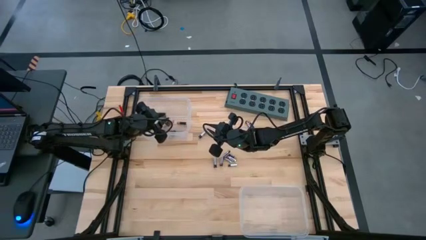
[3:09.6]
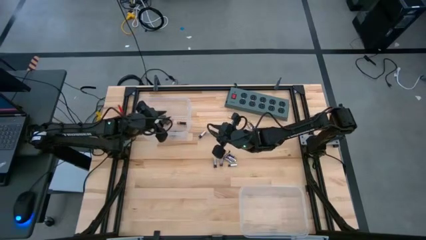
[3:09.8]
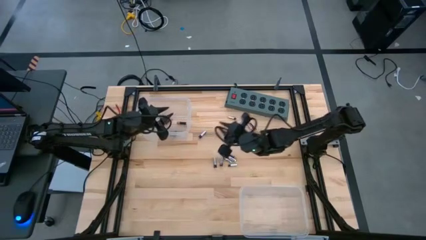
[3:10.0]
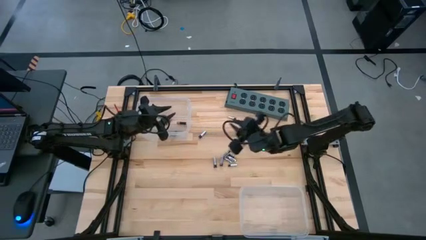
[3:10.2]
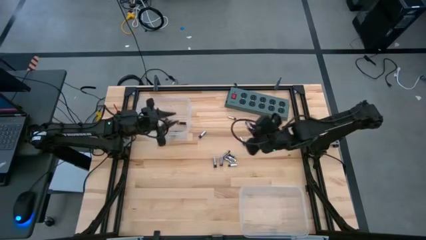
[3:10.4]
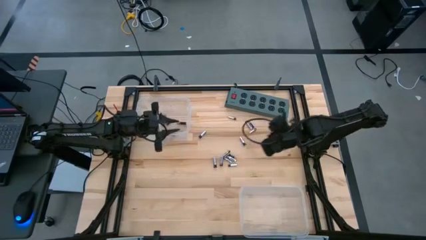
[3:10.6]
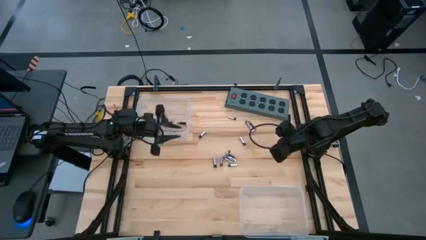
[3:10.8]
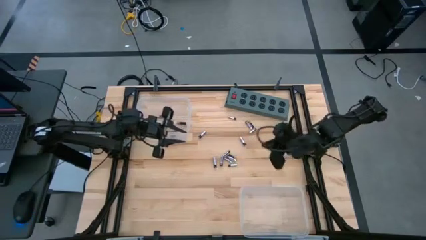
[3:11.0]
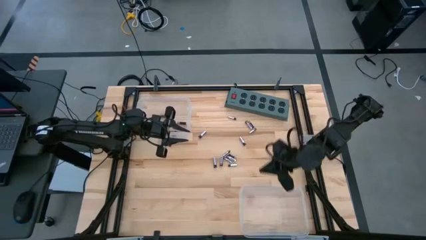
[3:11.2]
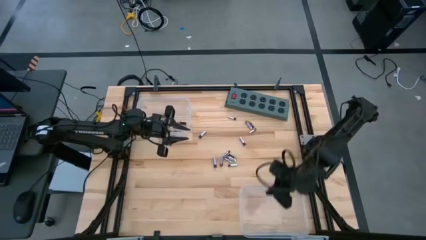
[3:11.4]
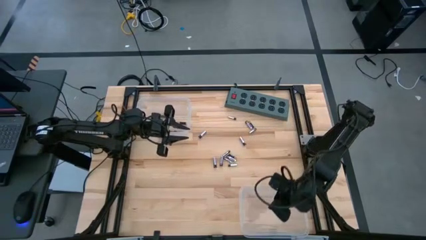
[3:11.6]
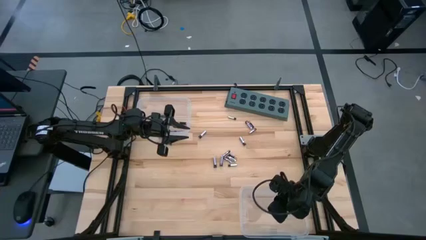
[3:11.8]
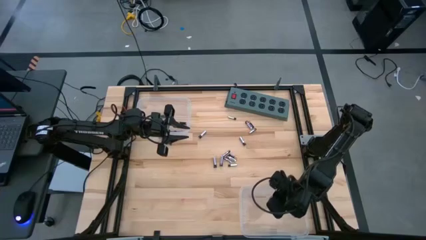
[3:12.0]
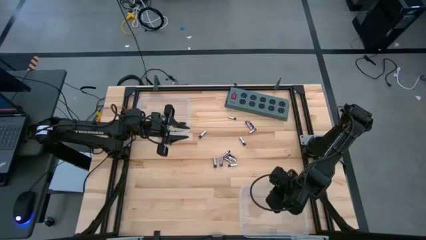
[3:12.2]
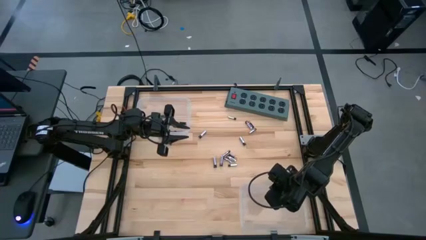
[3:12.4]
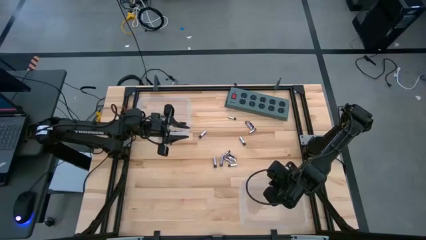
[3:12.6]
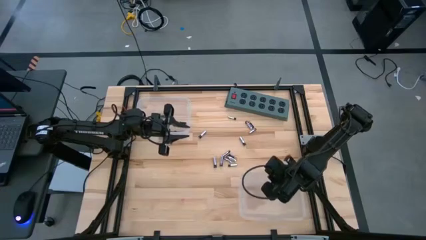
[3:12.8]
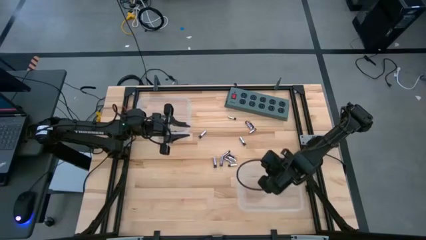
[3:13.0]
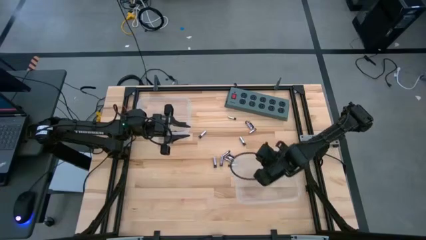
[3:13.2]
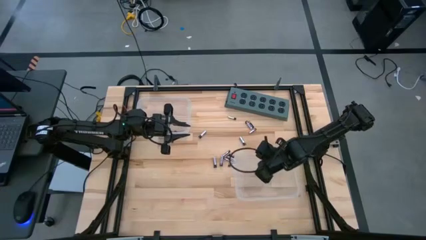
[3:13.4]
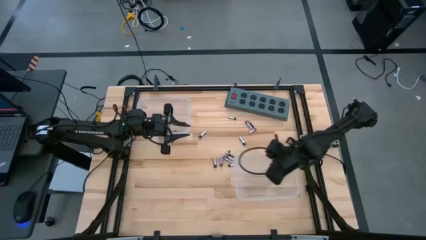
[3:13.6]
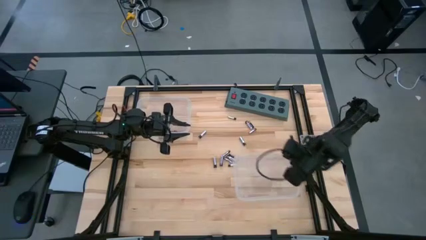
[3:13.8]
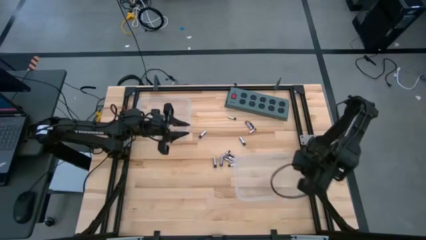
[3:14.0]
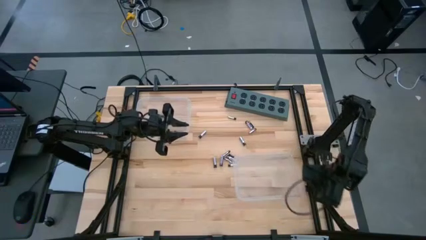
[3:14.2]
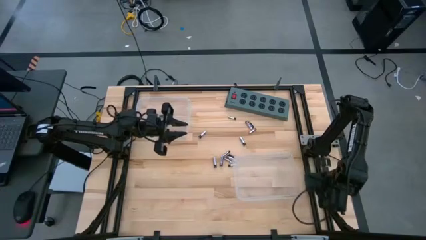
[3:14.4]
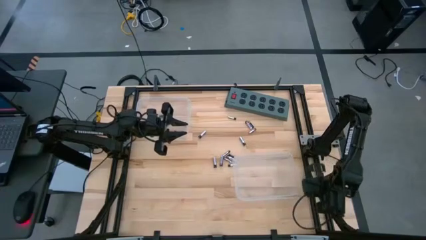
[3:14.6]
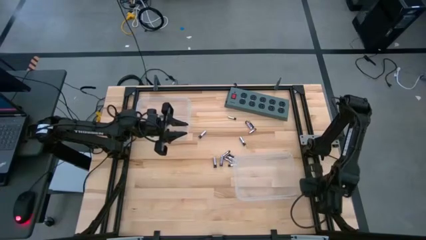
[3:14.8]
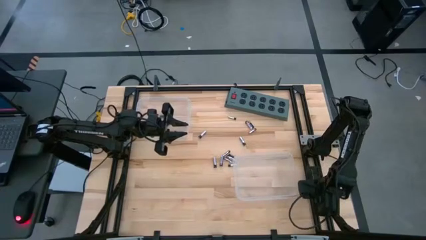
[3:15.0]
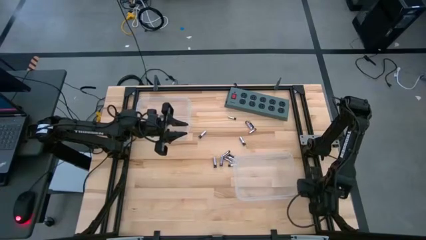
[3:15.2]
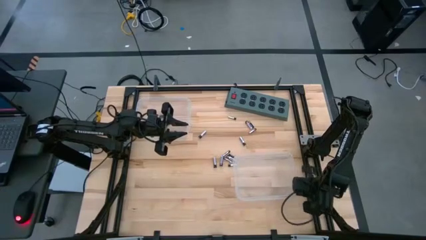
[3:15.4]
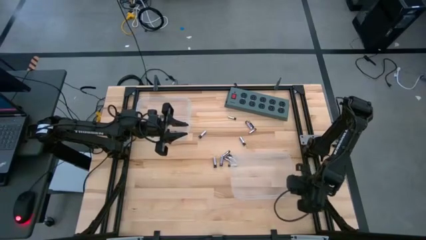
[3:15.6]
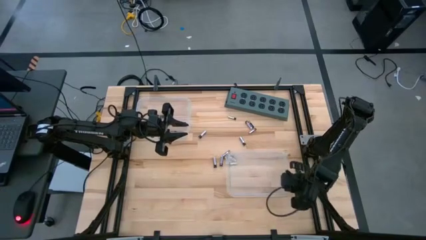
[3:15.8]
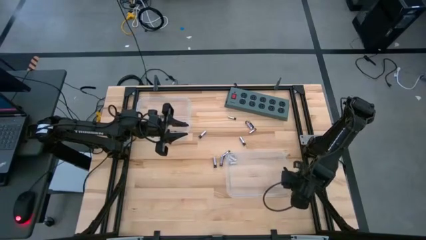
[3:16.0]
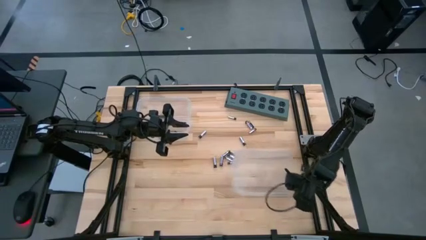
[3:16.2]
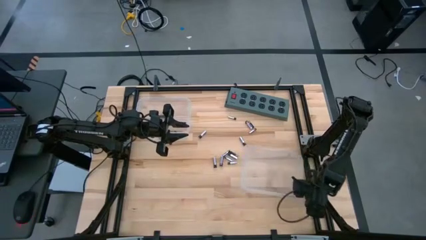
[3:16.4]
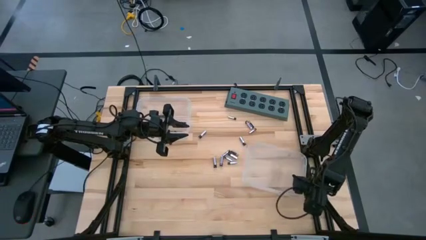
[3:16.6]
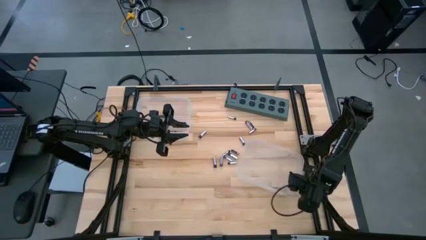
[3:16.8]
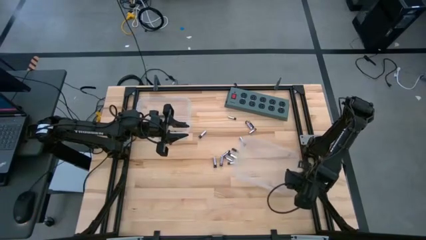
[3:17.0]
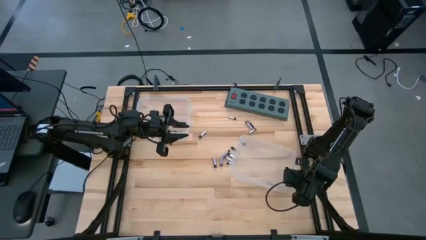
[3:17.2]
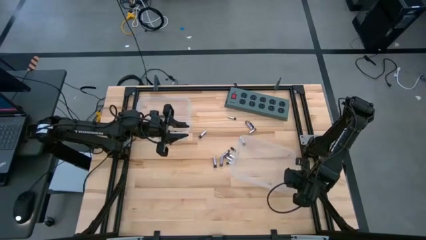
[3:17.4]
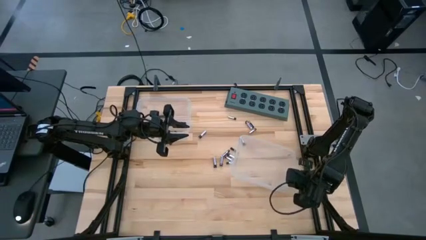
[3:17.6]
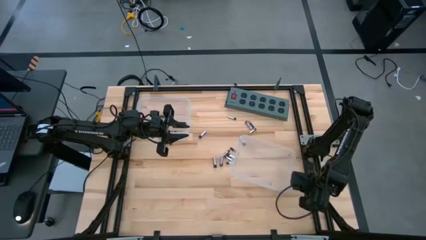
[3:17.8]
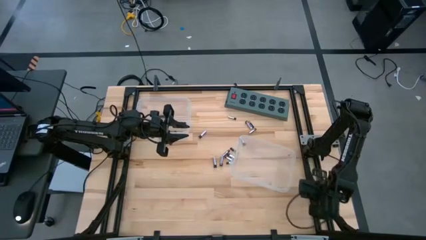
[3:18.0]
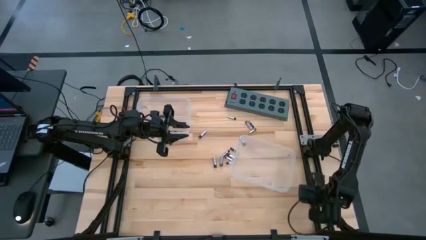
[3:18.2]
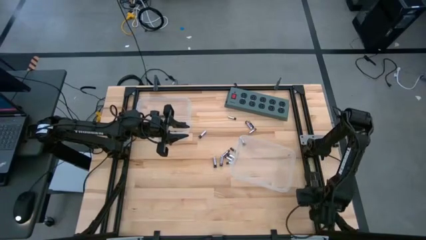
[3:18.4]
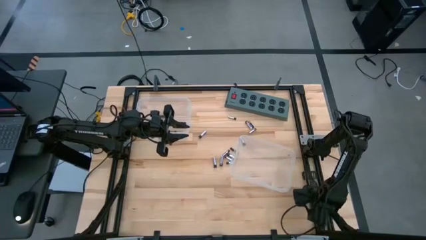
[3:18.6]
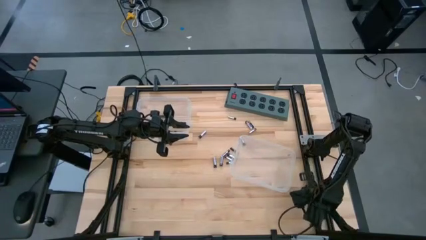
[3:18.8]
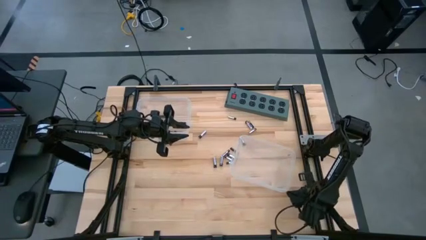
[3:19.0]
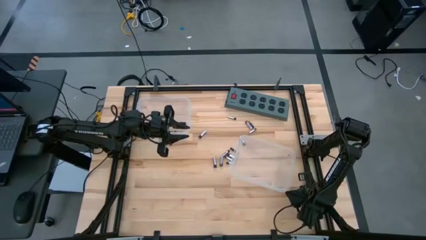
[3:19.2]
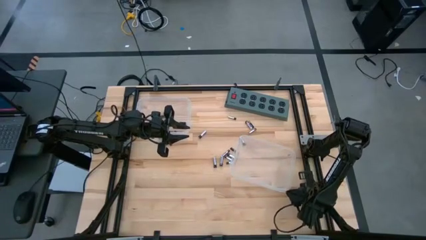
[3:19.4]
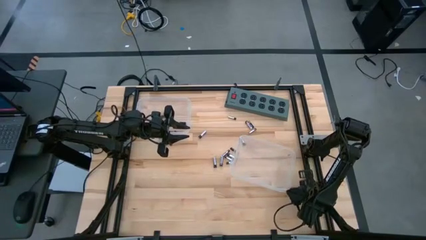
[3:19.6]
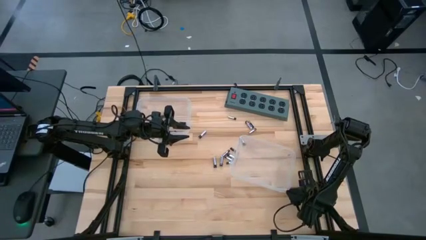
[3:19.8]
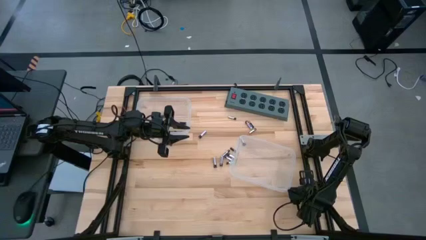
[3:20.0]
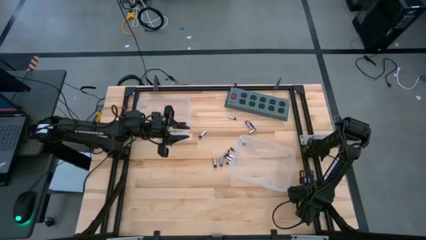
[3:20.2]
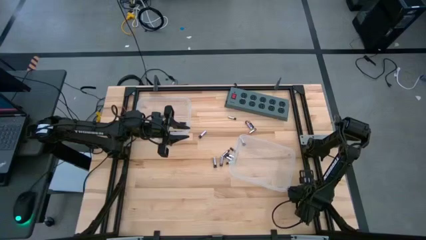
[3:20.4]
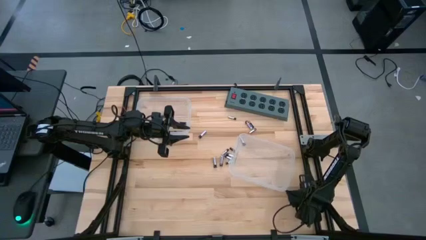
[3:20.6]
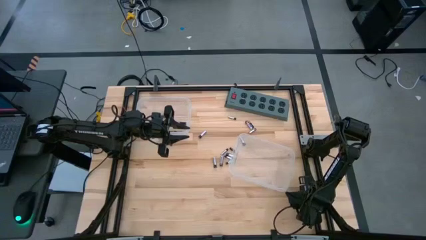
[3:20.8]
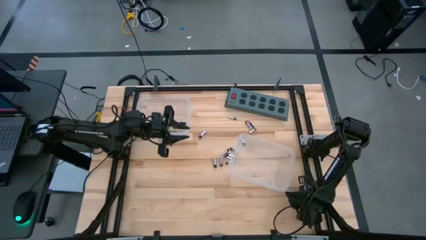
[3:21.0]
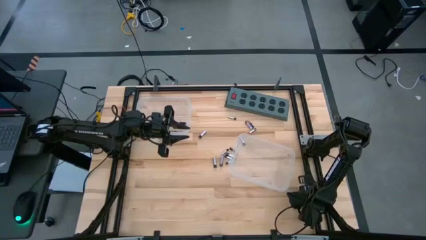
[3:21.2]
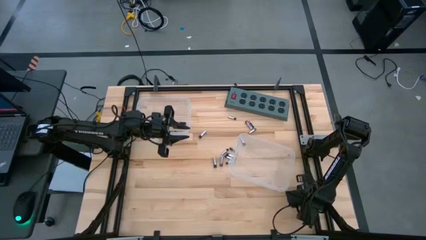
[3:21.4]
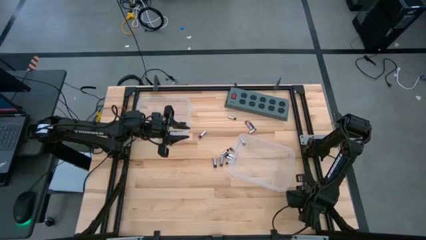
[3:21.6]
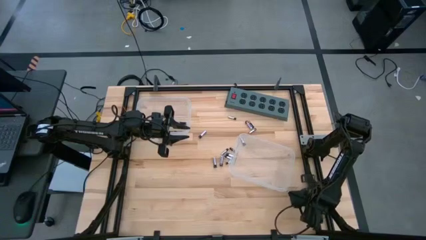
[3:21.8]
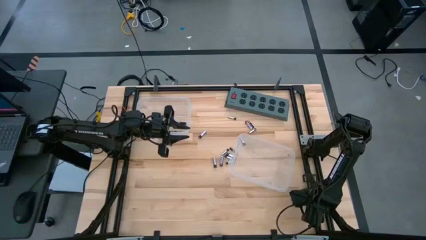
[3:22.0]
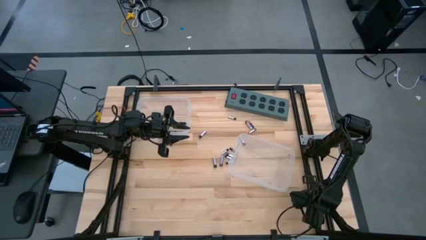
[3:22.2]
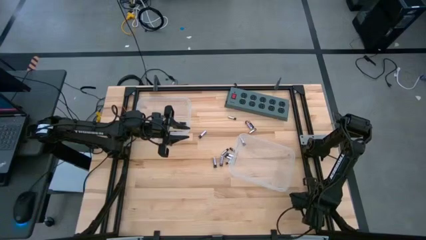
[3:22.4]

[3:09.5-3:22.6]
Task: Sort batteries
Put the black battery into the top transparent bin
